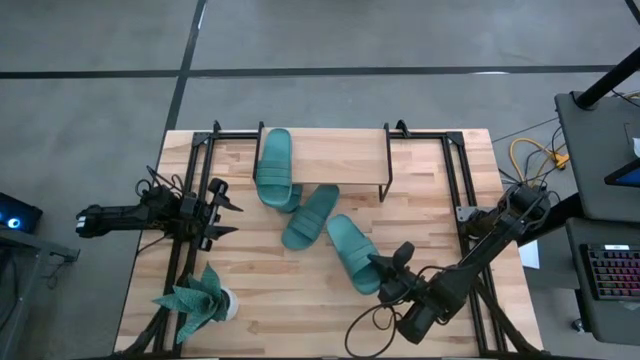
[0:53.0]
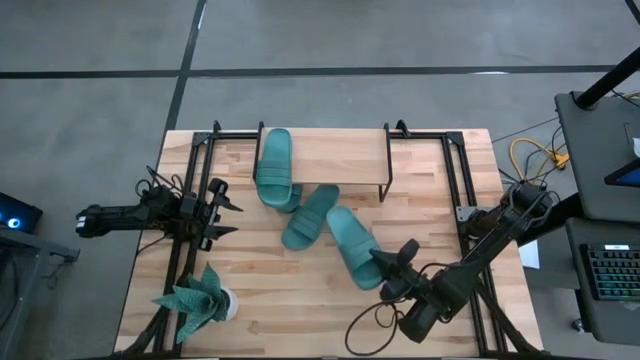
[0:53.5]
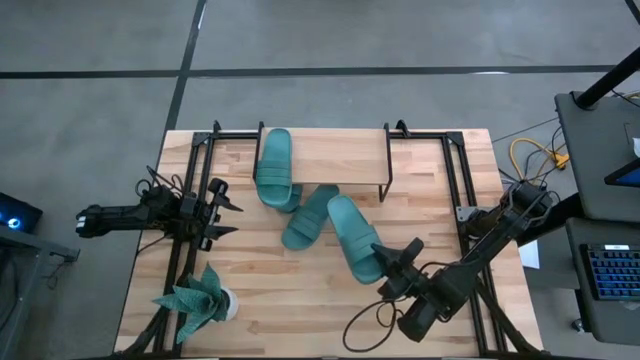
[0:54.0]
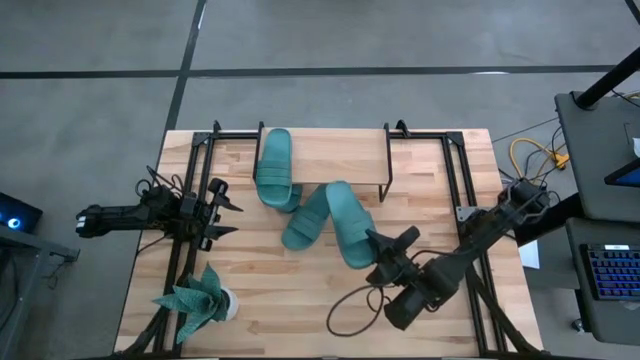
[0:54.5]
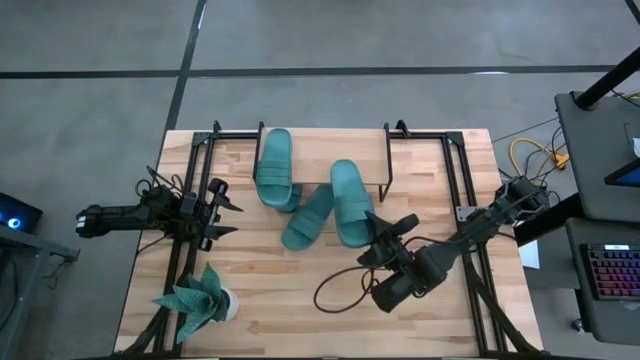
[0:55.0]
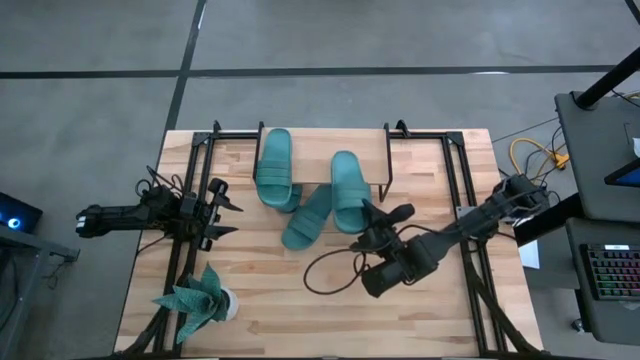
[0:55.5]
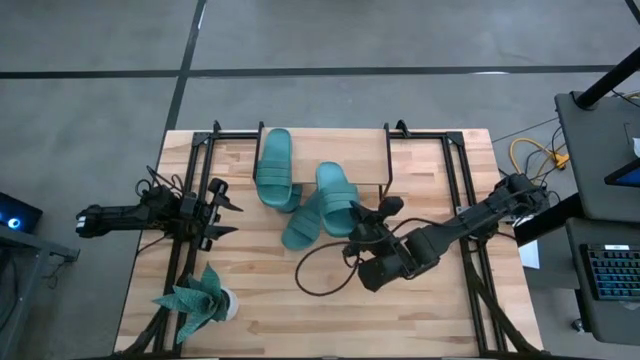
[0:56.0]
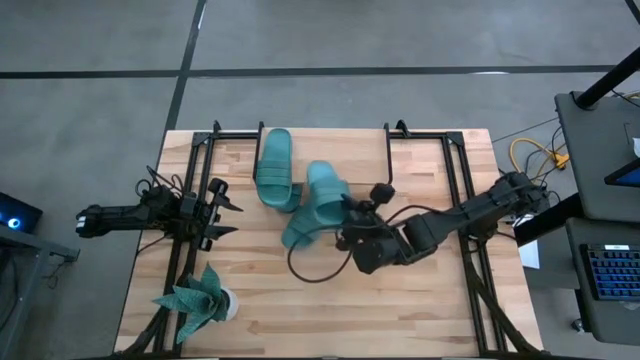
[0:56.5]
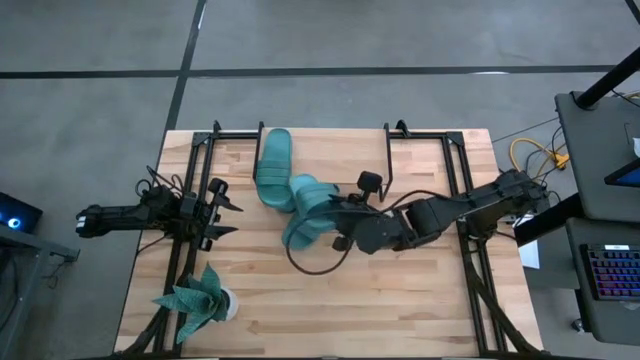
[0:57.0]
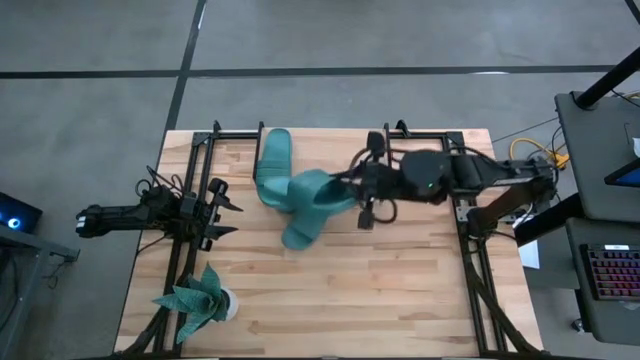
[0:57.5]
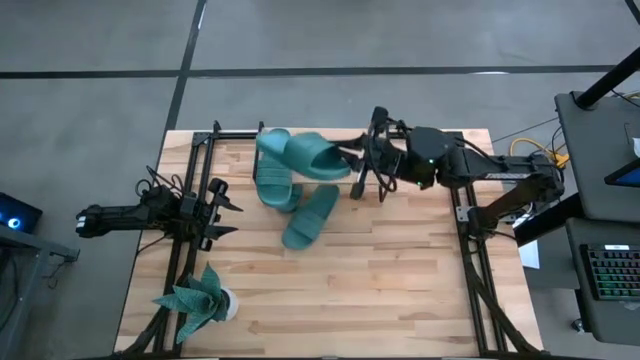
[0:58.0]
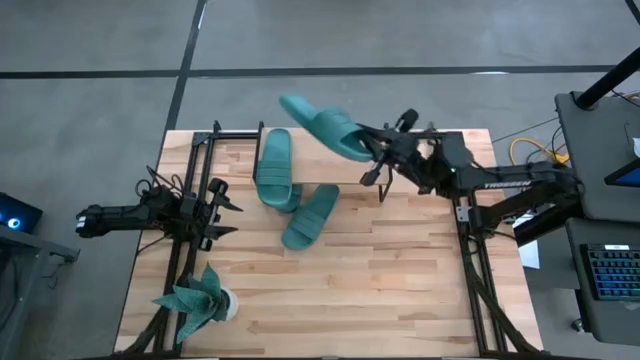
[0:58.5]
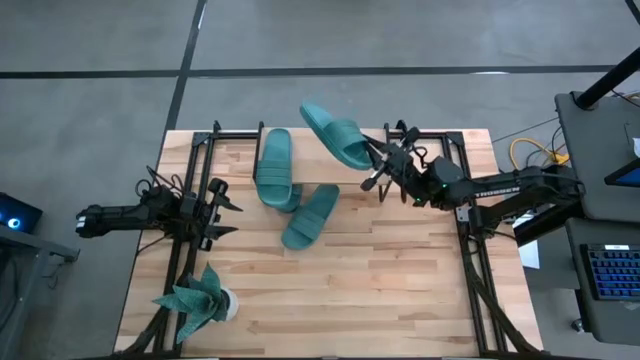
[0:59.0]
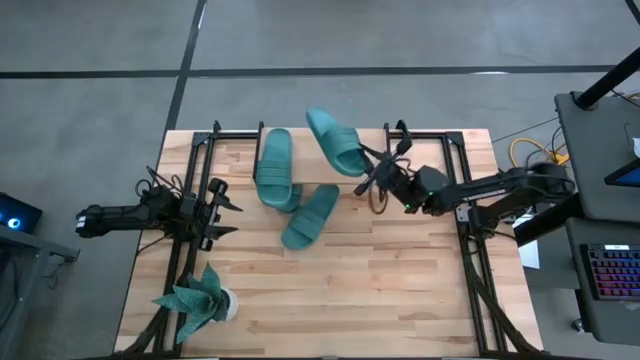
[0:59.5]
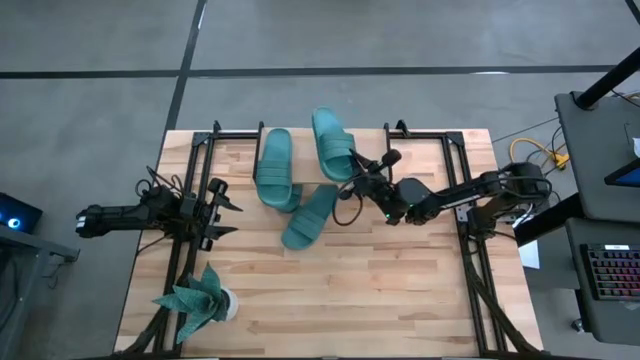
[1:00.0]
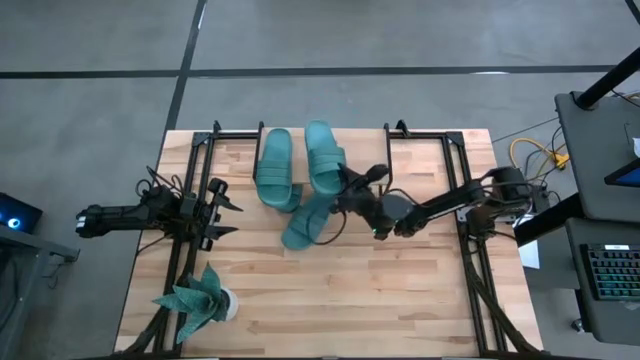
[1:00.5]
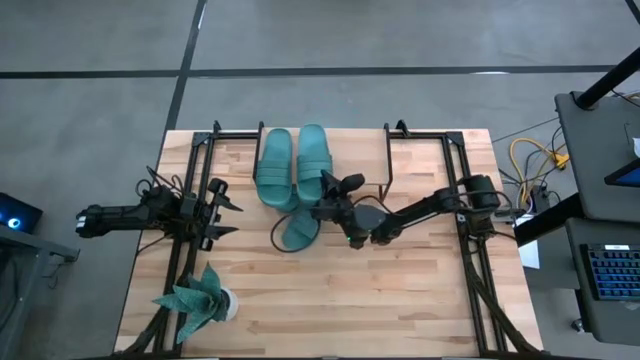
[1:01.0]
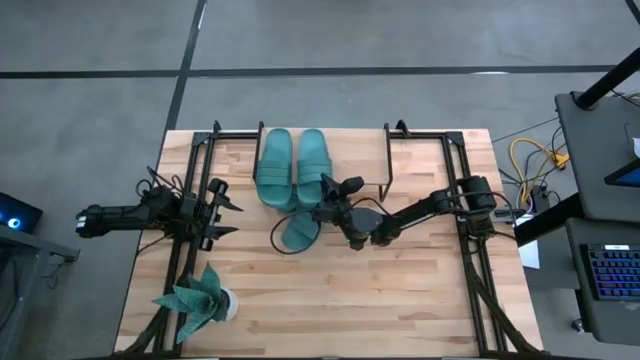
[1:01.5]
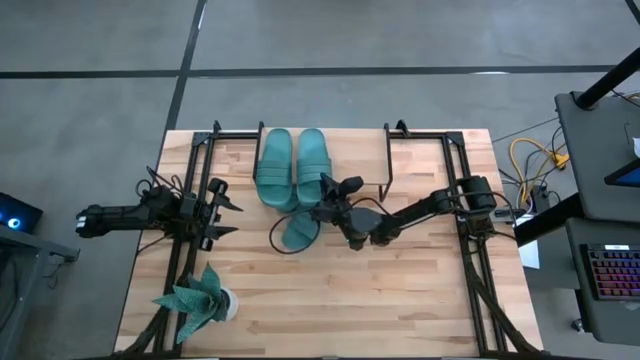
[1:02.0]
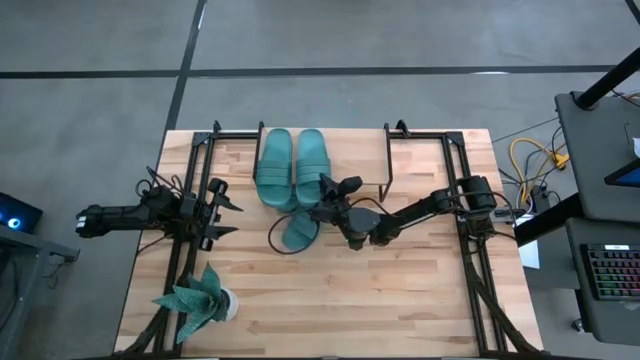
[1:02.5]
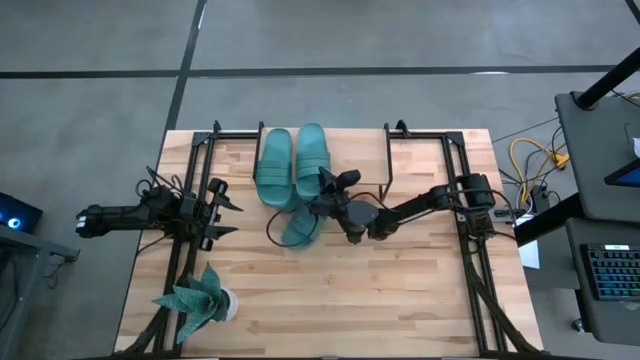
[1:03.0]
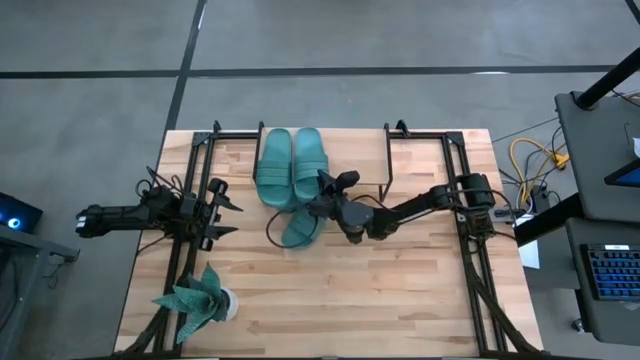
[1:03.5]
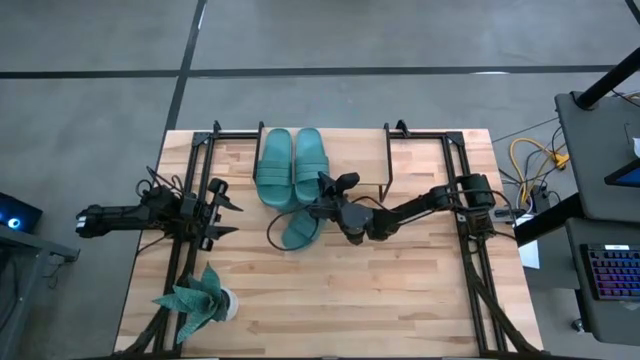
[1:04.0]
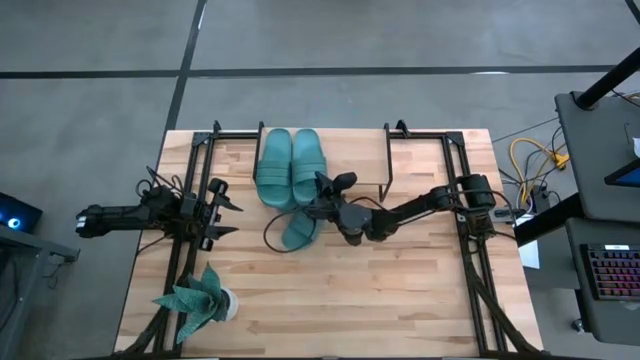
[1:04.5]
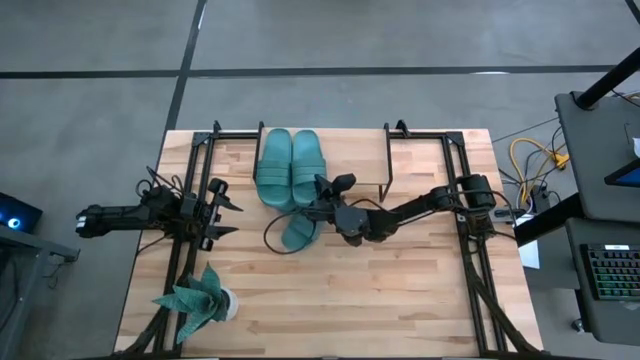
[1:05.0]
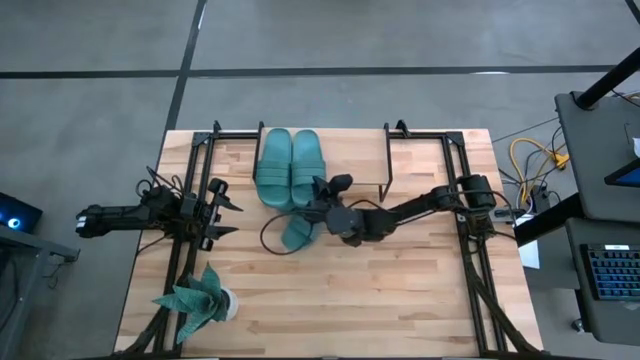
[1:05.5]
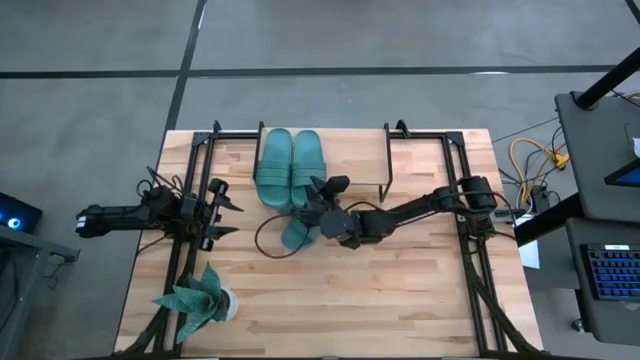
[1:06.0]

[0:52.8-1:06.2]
Task: Pick and place slides into the shelf
Put the blue slipper on the shelf

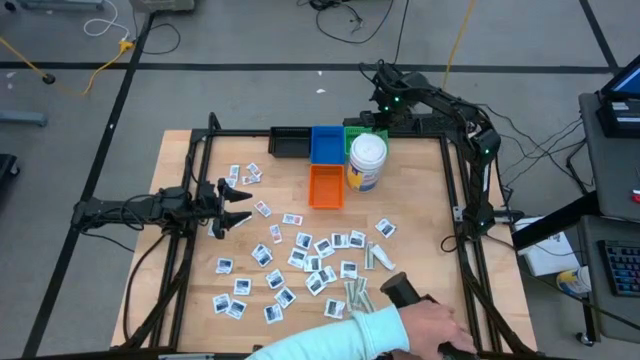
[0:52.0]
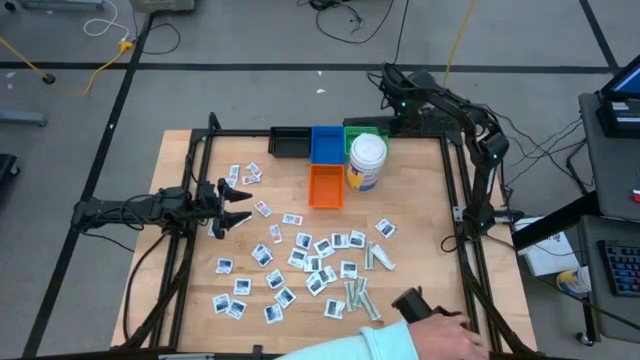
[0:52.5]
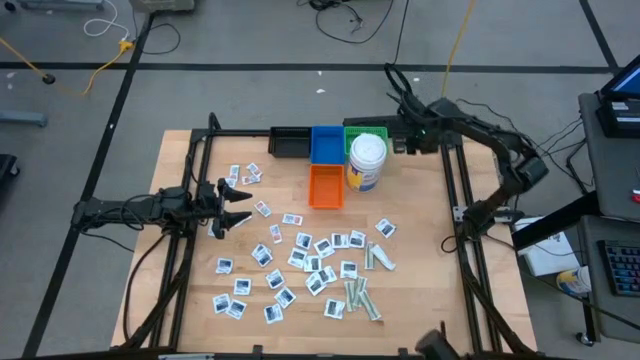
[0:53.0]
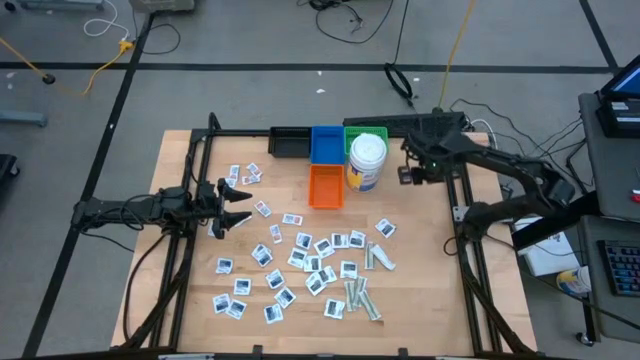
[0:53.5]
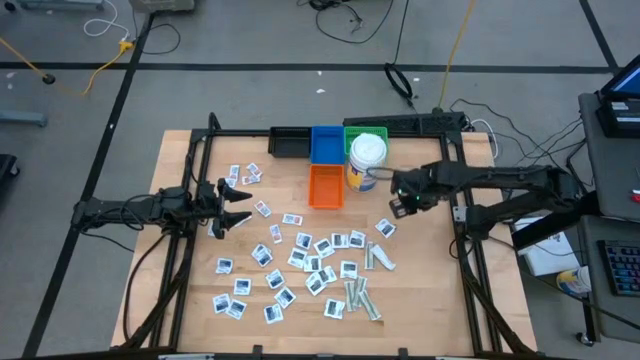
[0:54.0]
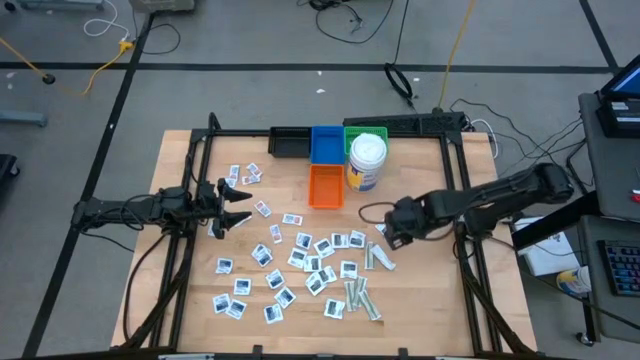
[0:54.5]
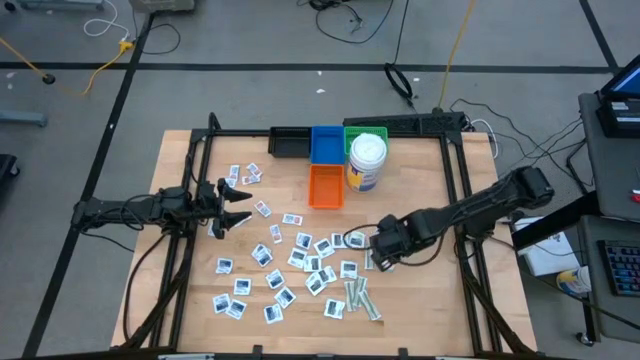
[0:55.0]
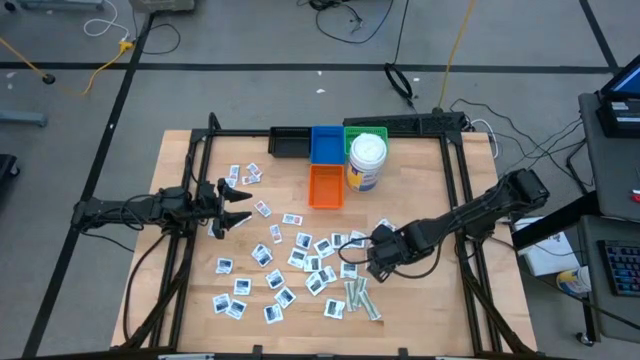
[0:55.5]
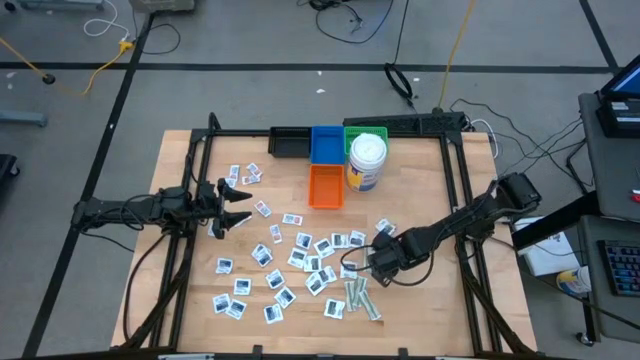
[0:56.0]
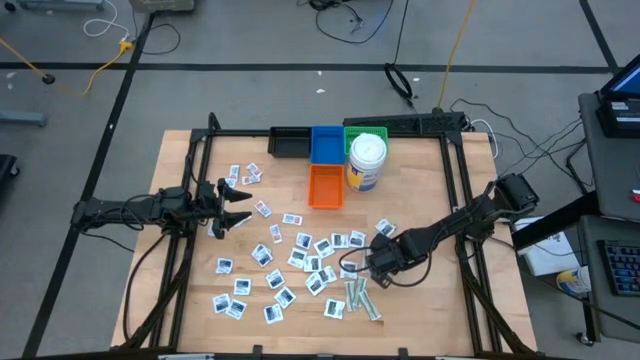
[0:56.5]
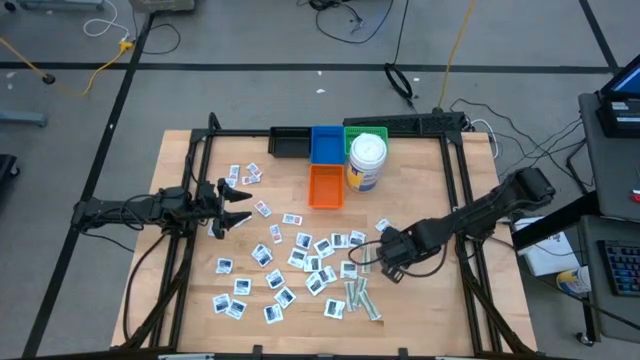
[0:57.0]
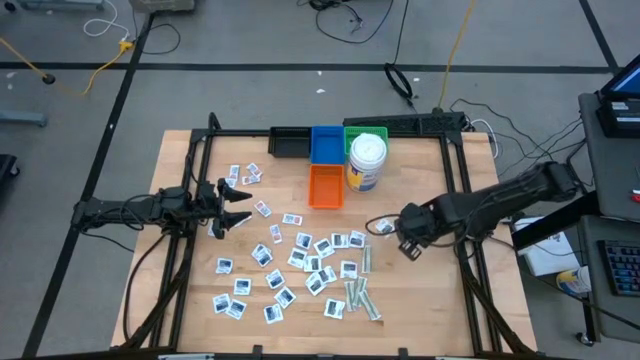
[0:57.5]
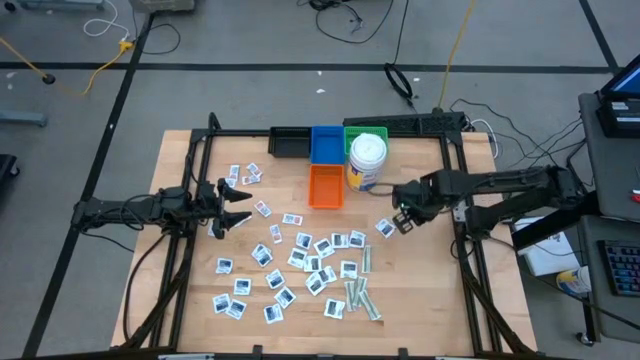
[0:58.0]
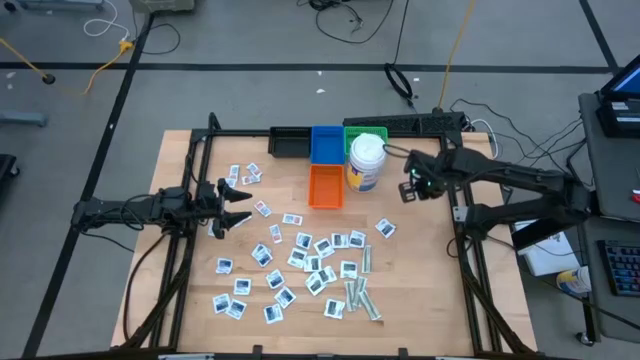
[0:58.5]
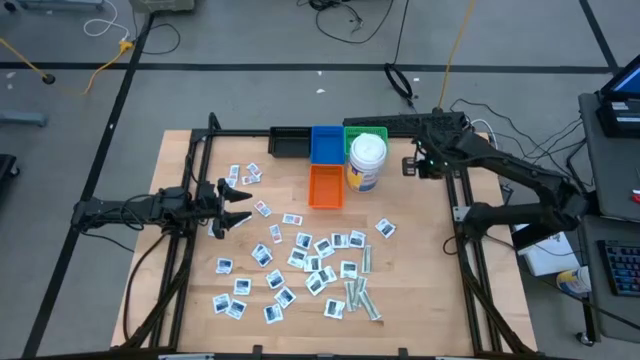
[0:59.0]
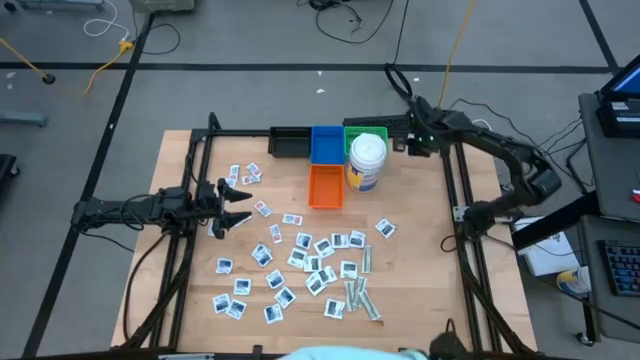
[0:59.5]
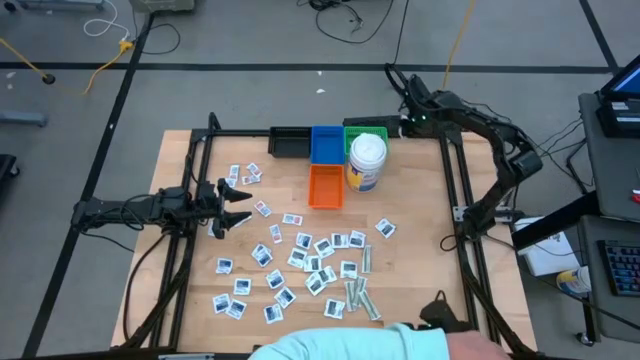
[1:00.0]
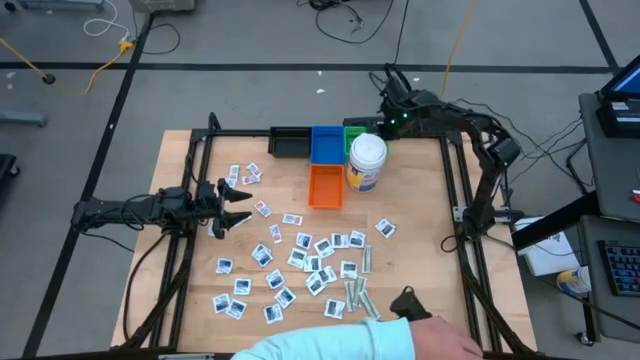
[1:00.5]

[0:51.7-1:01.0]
Task: Pick & Place First Aid Supplies
Put the green bandage pack into the green bin
